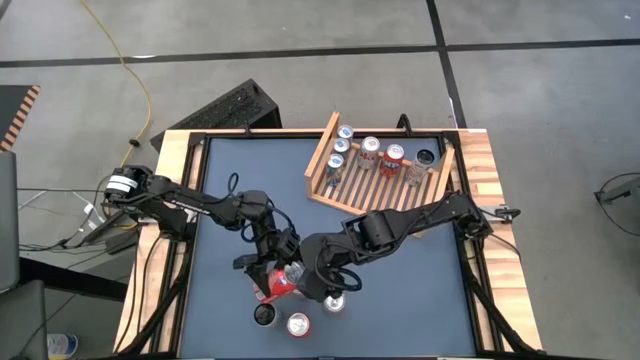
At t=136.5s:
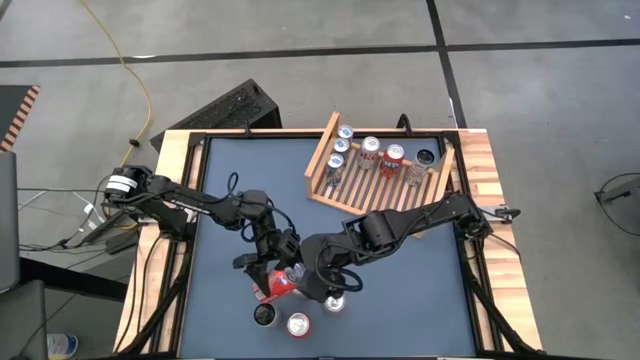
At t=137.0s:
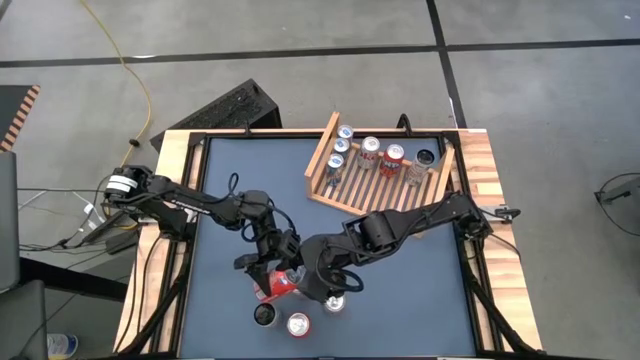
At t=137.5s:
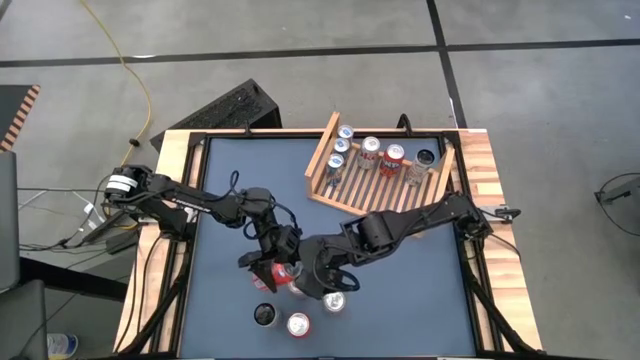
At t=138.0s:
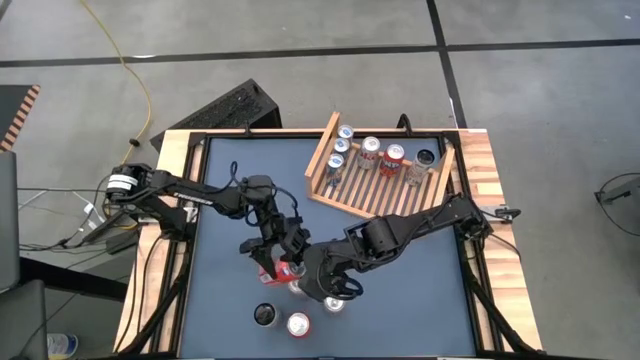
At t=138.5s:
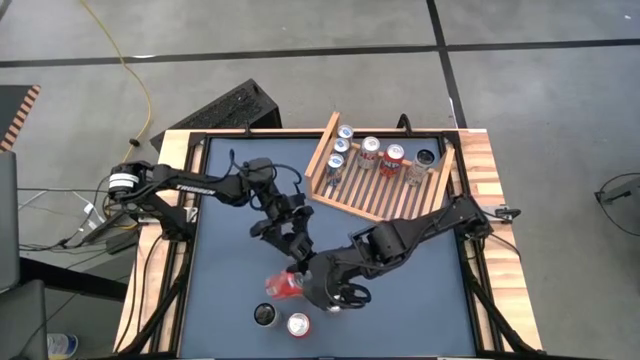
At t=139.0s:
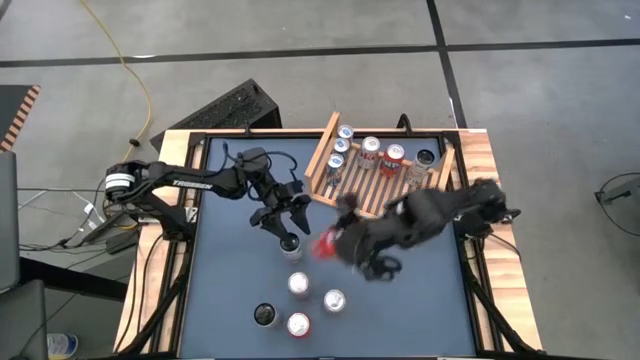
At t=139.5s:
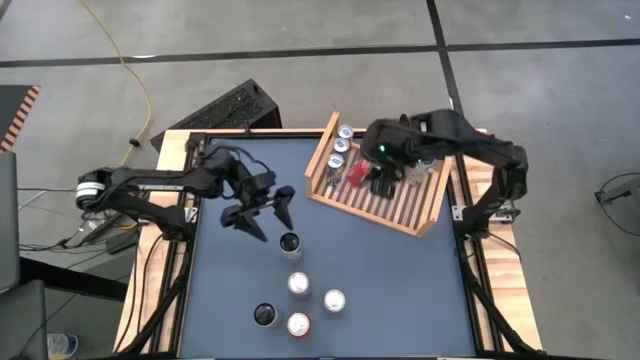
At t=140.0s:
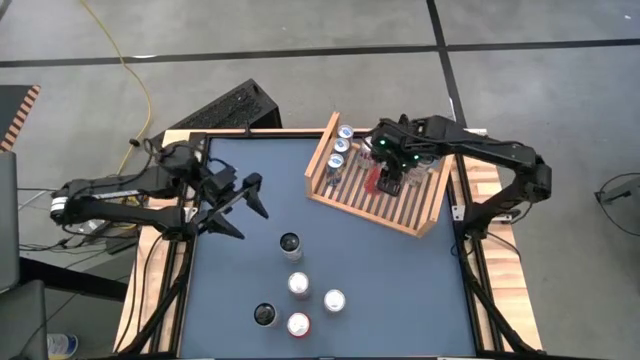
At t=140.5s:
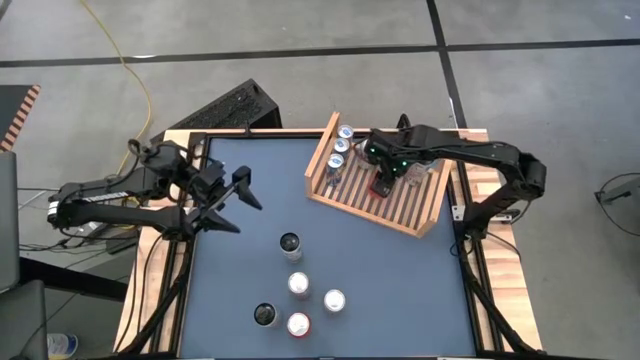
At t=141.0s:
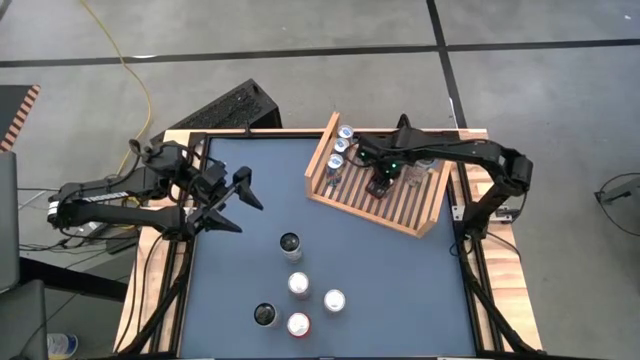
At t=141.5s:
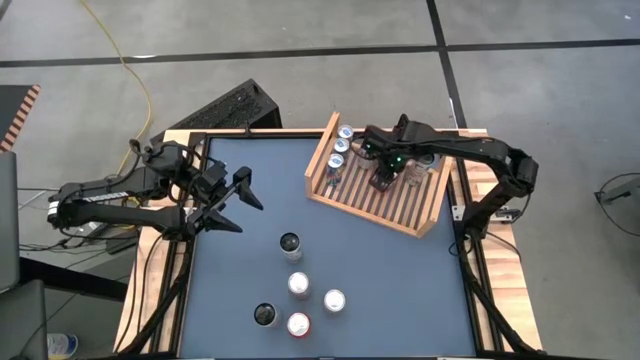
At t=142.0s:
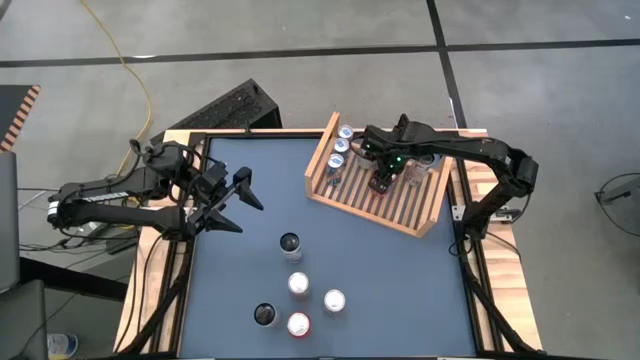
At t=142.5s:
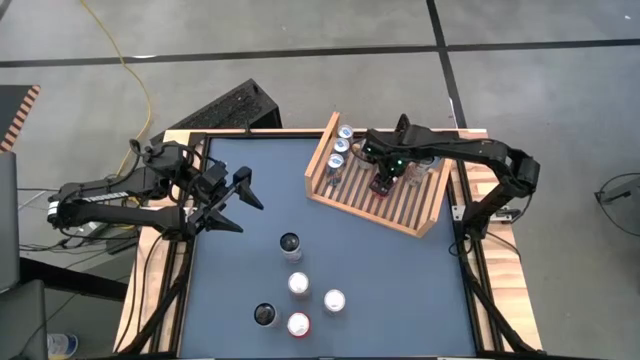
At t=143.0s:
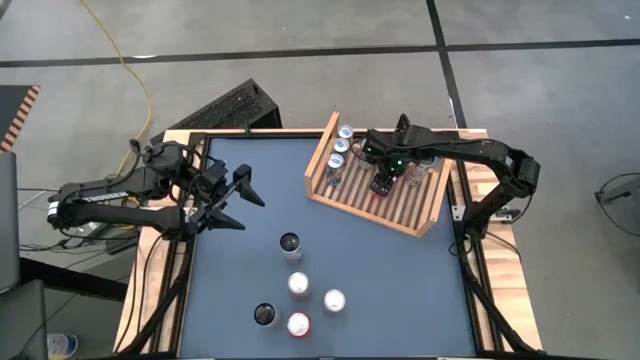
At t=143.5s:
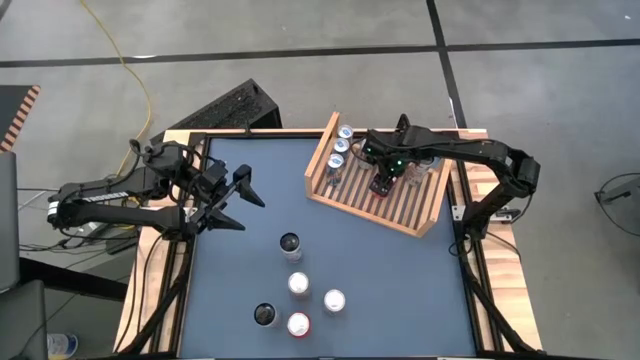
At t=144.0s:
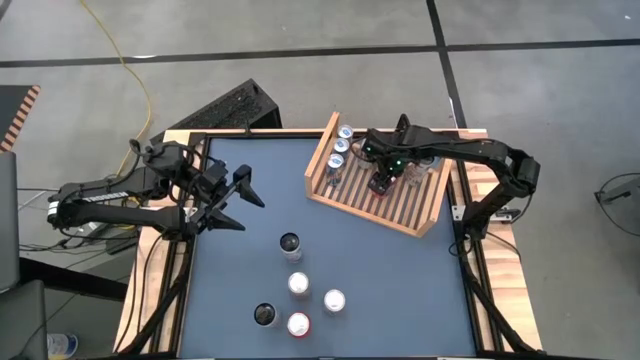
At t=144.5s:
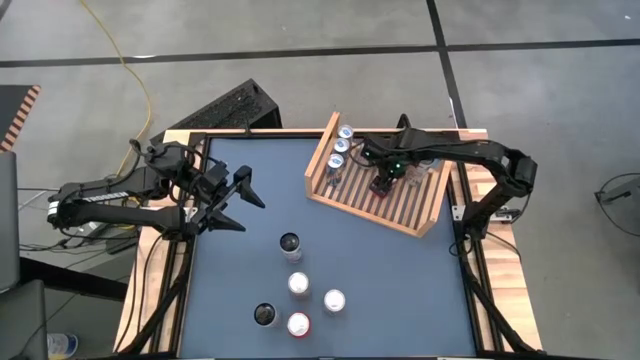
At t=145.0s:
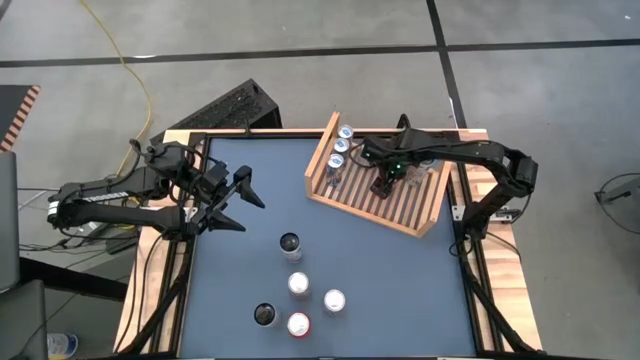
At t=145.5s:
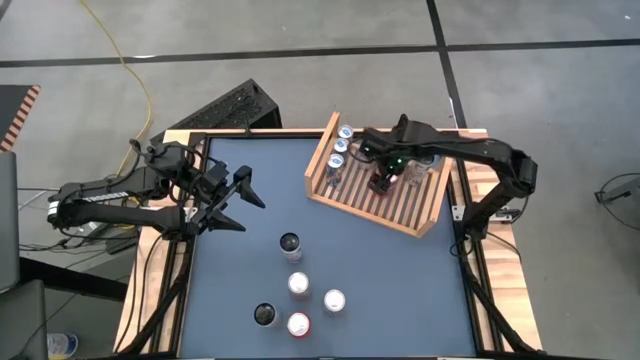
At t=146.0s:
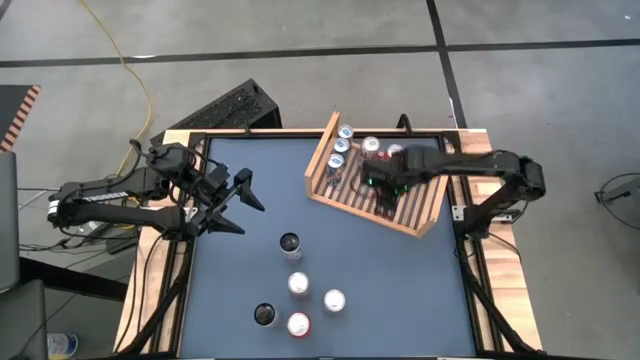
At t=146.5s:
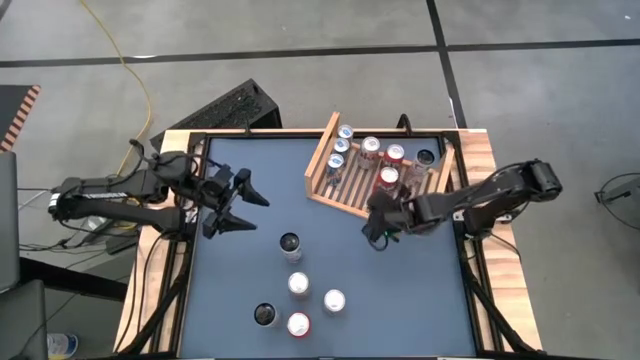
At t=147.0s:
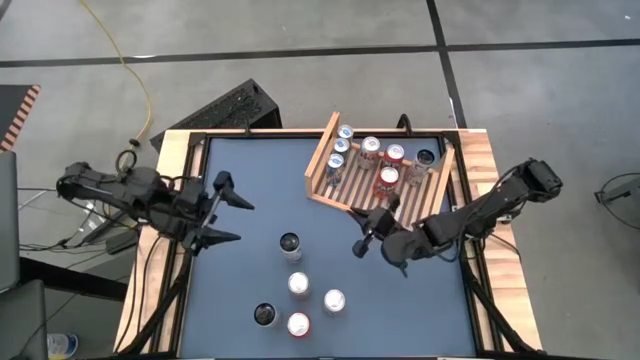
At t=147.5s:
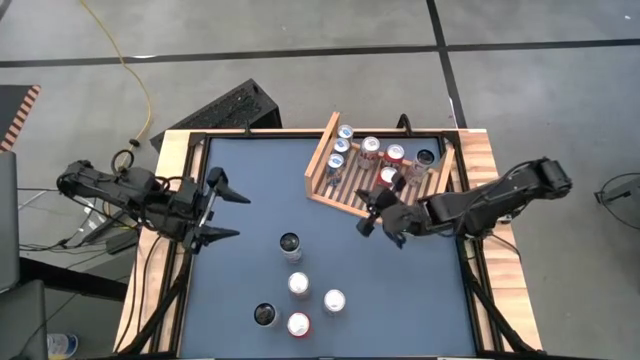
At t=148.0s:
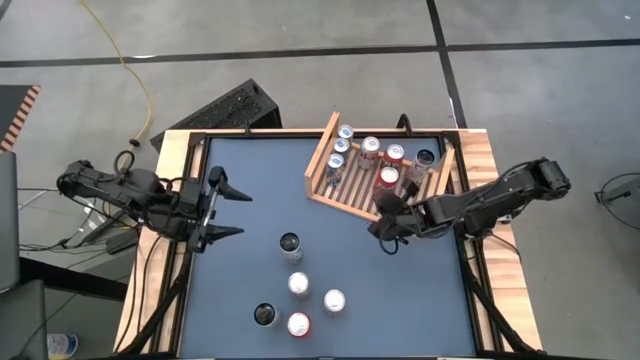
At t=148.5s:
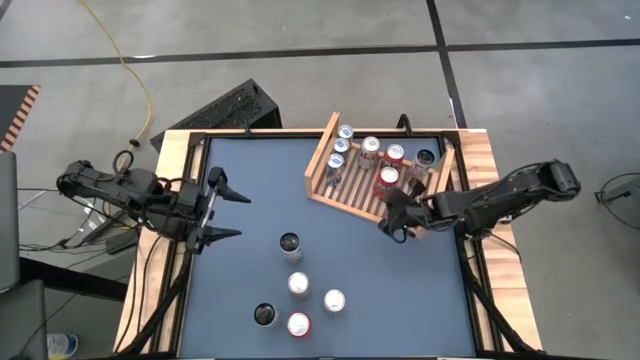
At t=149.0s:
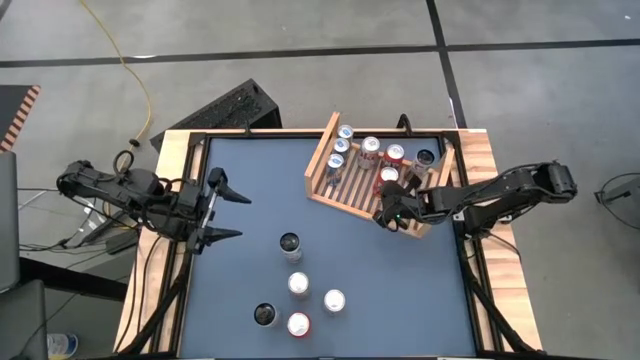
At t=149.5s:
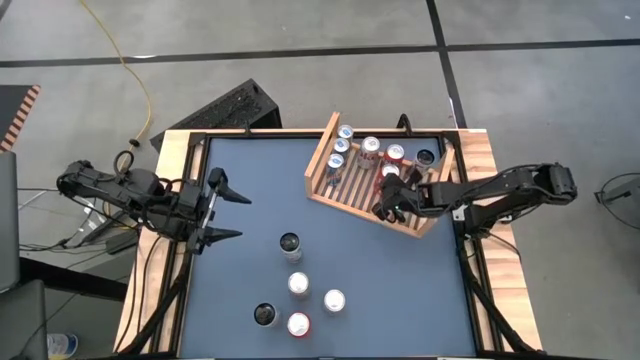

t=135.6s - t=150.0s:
Task: Place canned beverage on shelf
Put the top red soda can aligned with the other red soda can on the shelf

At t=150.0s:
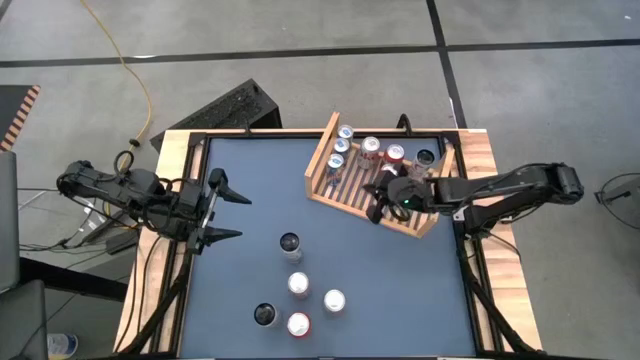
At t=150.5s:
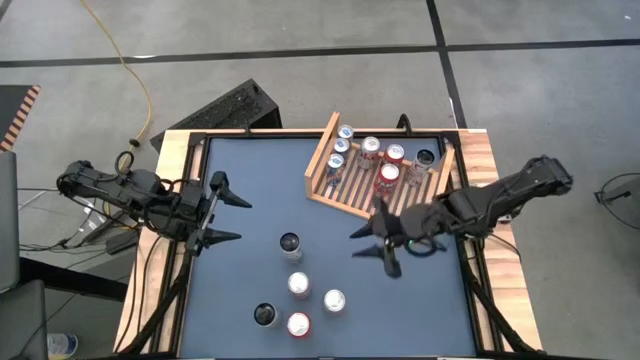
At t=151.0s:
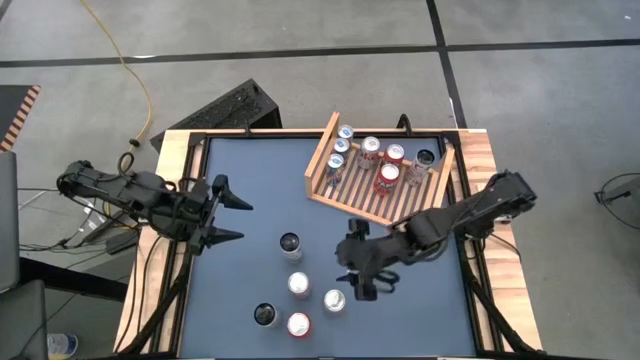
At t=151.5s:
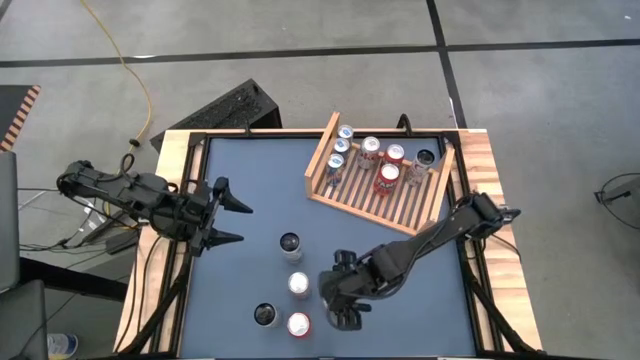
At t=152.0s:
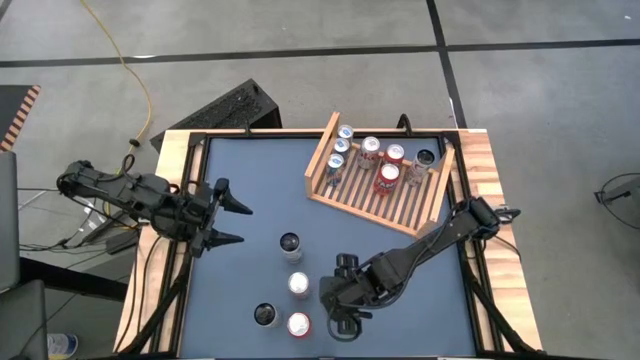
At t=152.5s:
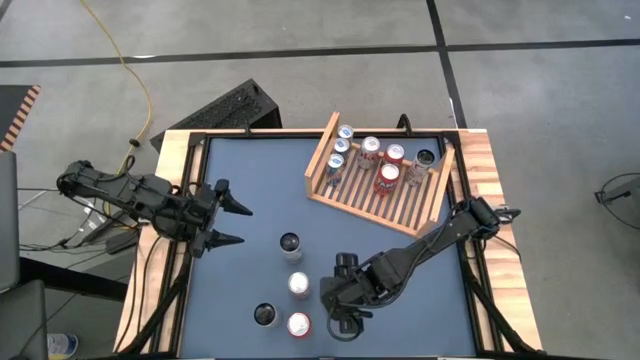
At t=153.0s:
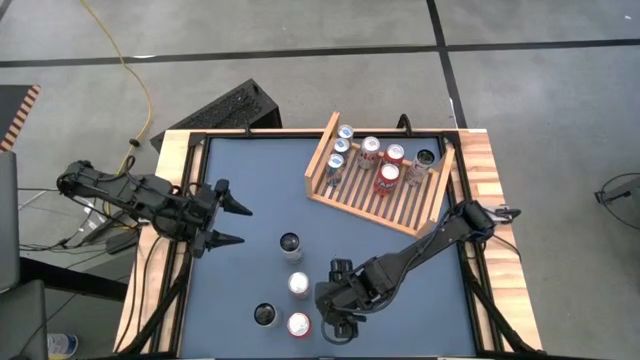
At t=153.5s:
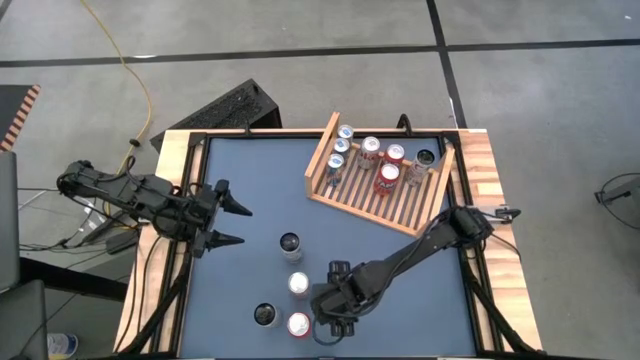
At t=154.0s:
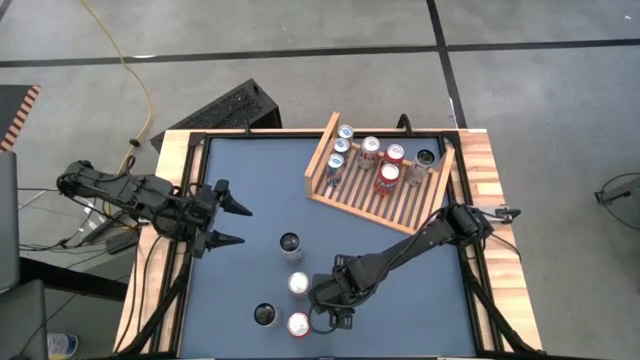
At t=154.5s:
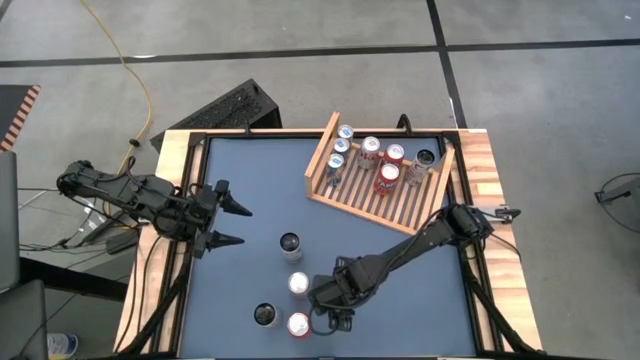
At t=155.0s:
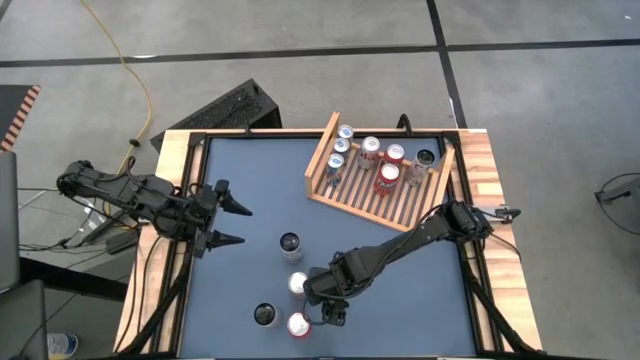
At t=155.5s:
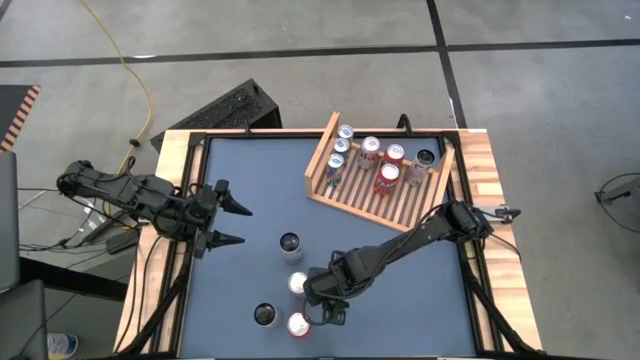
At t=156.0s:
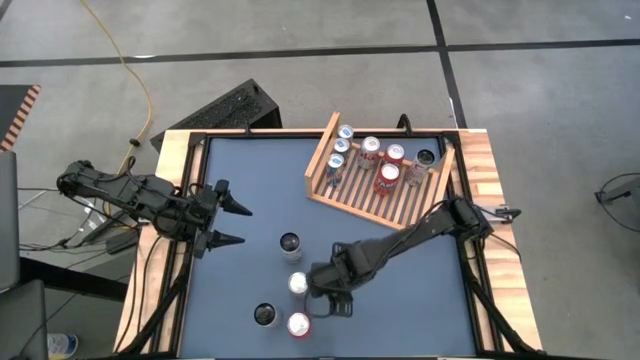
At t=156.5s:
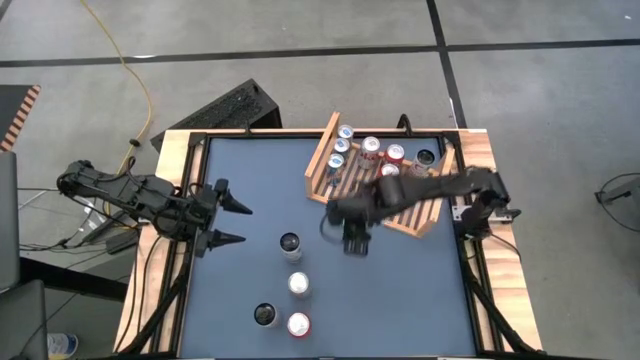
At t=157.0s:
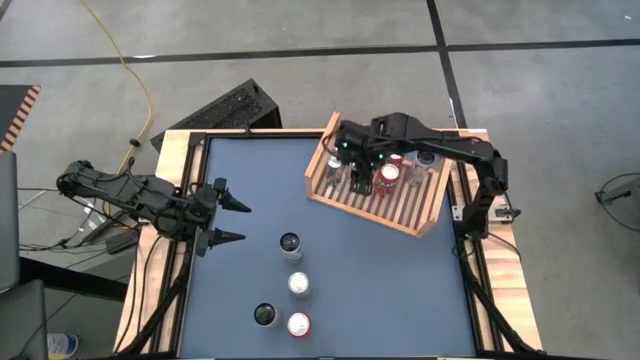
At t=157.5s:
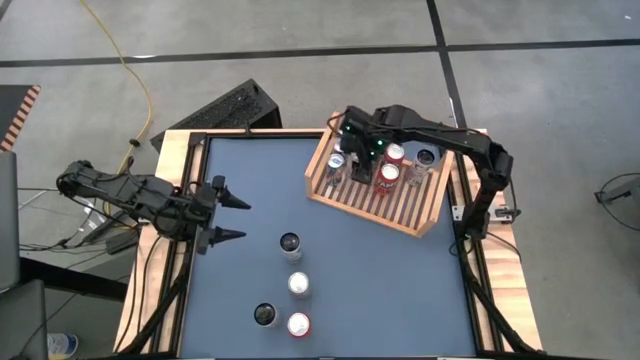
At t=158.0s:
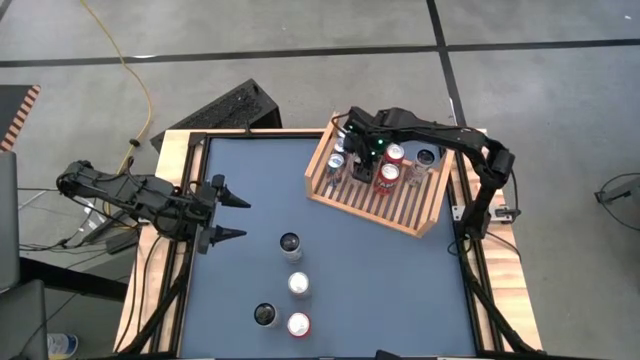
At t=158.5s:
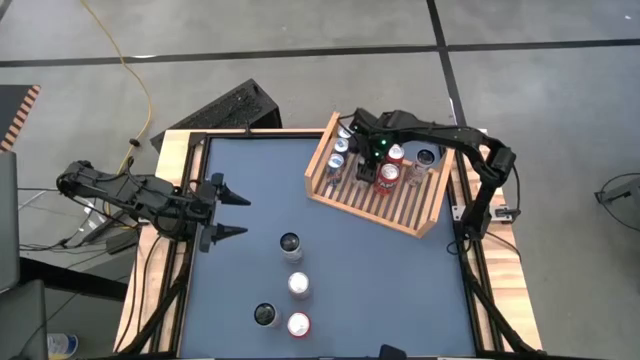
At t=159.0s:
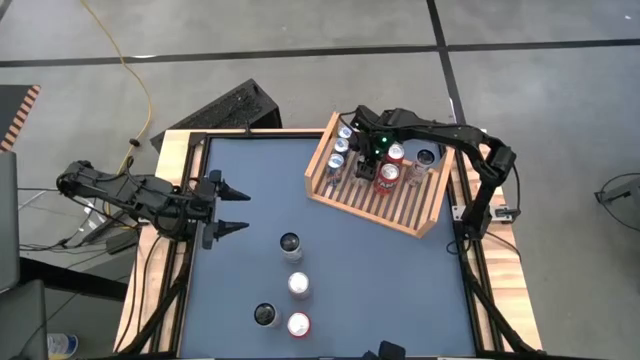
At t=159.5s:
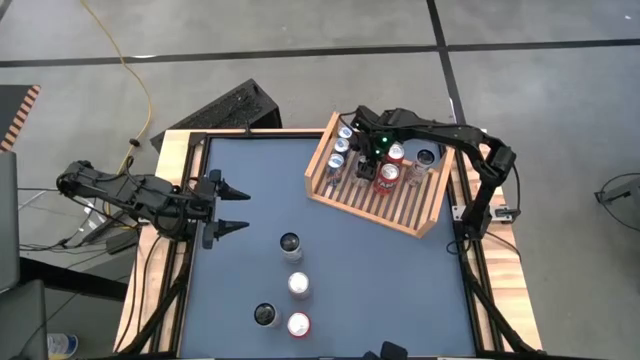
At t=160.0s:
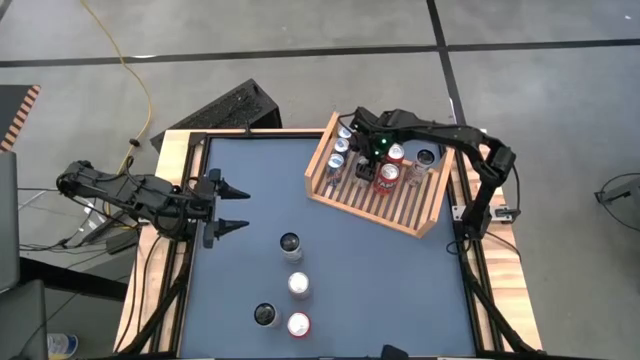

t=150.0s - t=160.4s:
Put the bottom silver soda can aligned with the other silver soda can on the shelf
